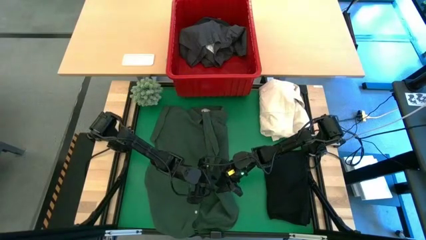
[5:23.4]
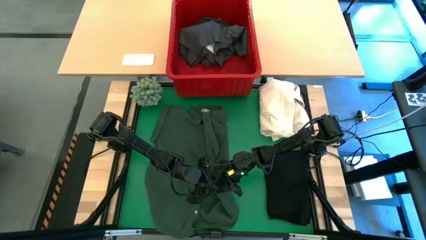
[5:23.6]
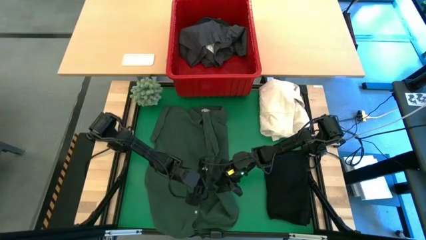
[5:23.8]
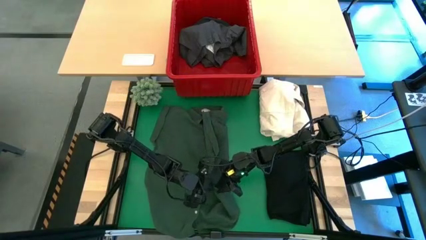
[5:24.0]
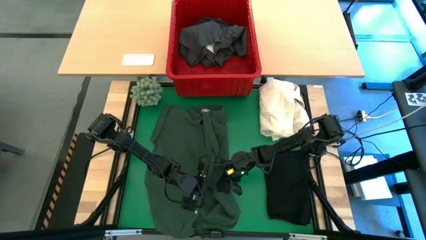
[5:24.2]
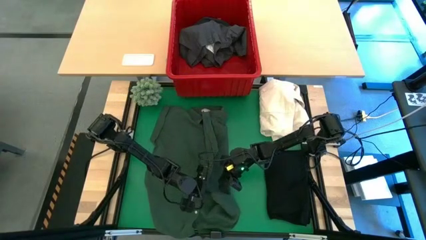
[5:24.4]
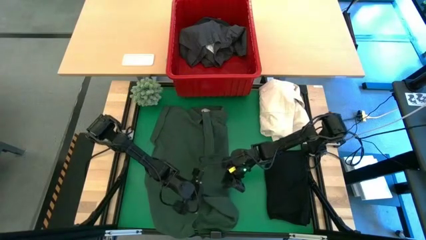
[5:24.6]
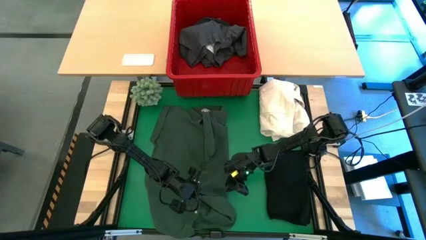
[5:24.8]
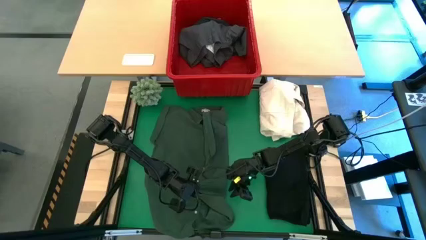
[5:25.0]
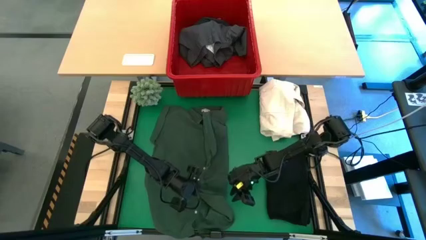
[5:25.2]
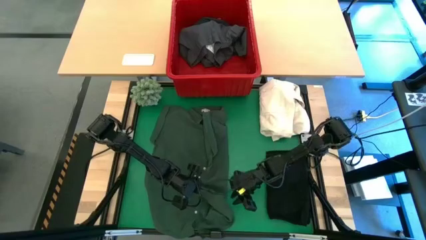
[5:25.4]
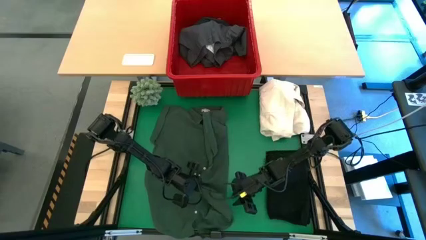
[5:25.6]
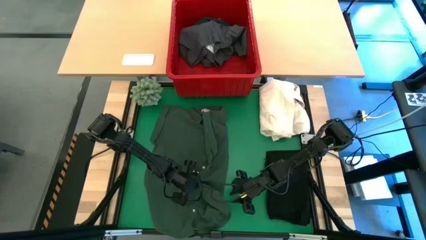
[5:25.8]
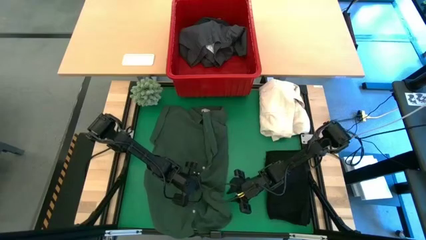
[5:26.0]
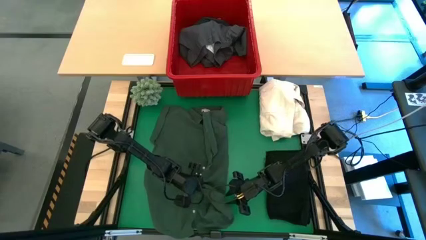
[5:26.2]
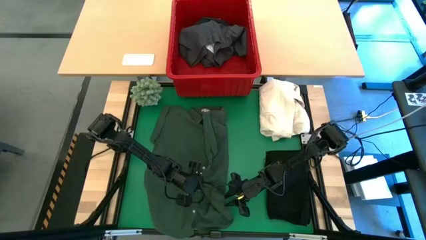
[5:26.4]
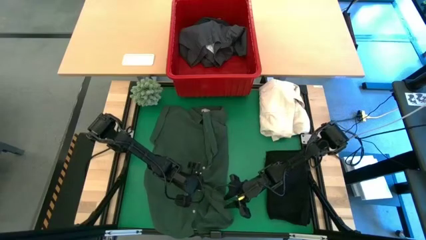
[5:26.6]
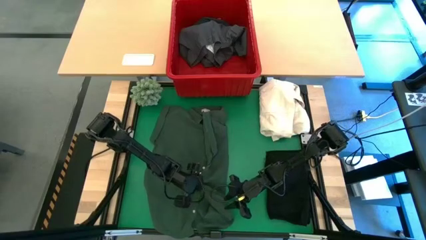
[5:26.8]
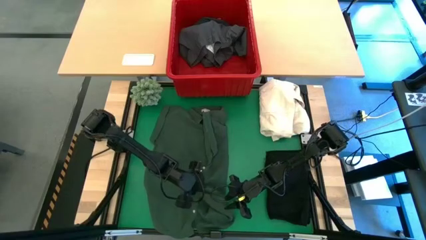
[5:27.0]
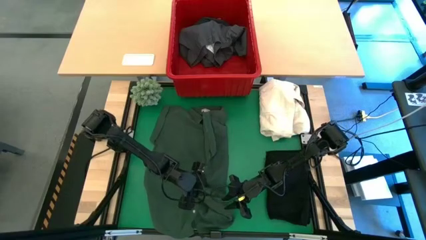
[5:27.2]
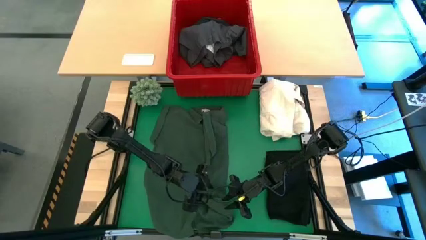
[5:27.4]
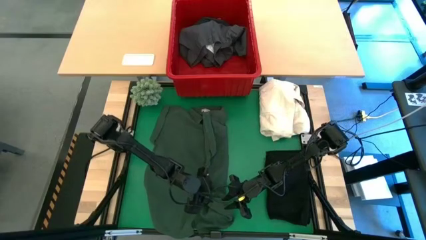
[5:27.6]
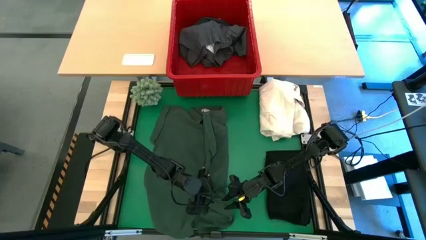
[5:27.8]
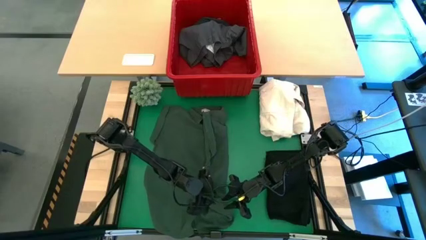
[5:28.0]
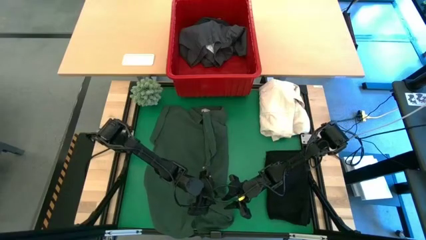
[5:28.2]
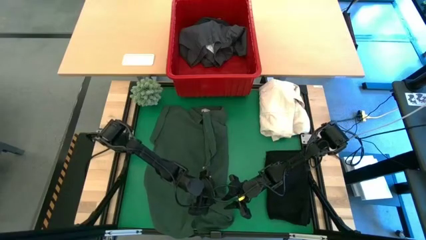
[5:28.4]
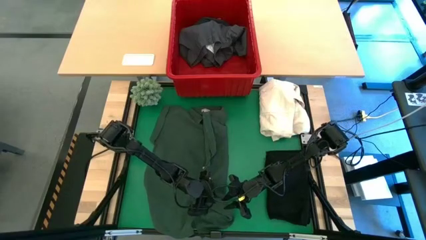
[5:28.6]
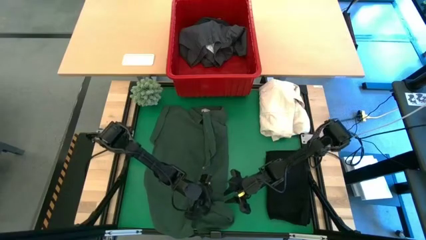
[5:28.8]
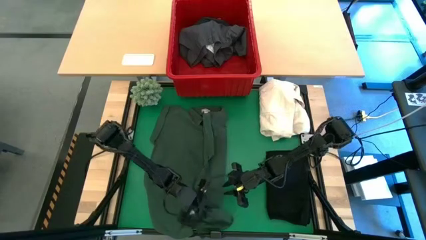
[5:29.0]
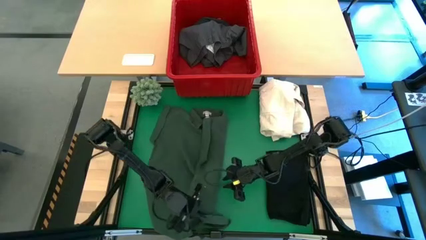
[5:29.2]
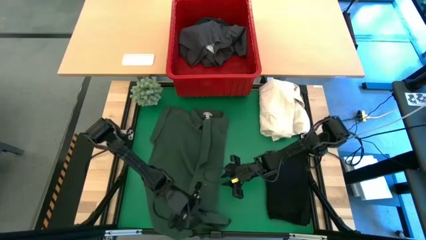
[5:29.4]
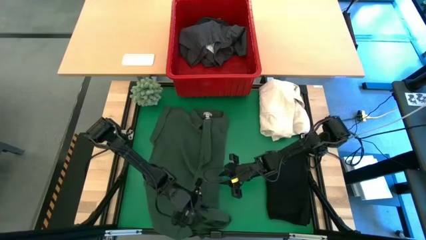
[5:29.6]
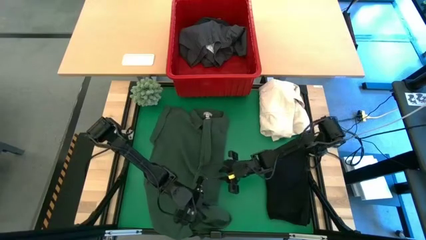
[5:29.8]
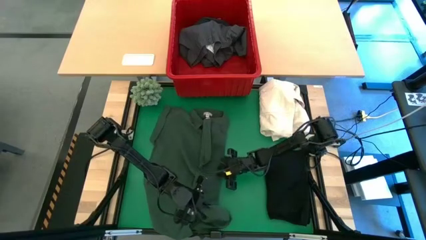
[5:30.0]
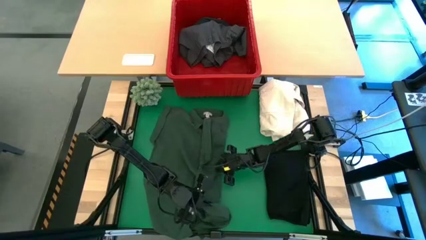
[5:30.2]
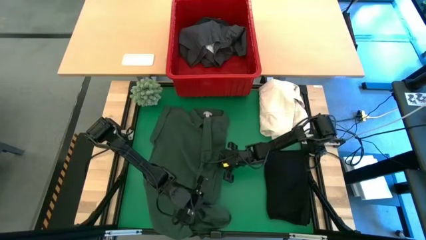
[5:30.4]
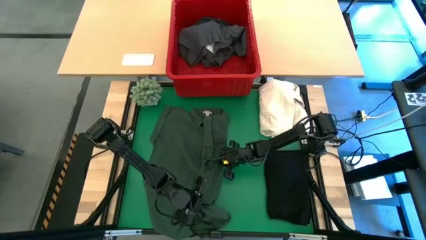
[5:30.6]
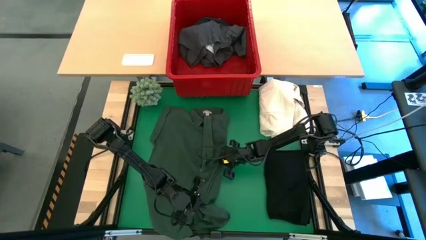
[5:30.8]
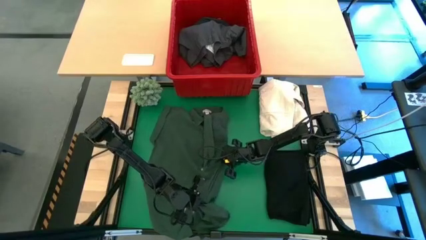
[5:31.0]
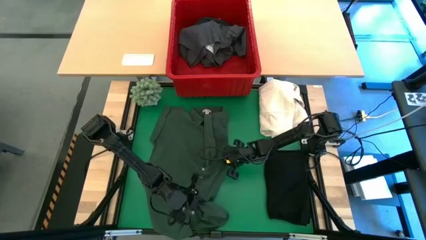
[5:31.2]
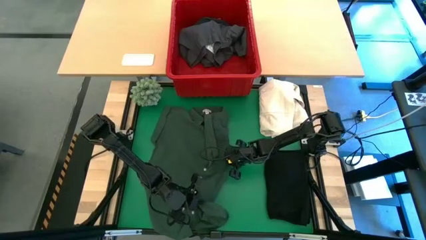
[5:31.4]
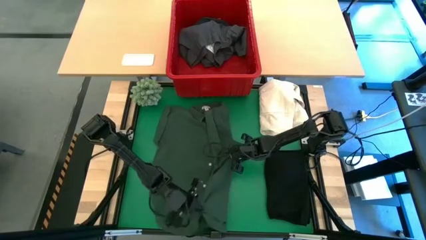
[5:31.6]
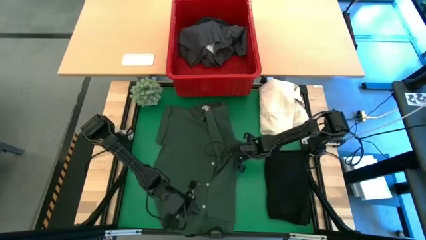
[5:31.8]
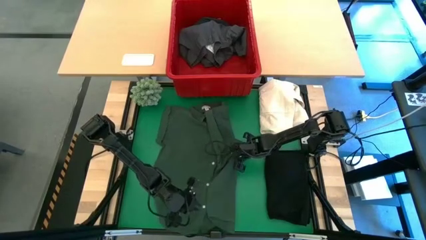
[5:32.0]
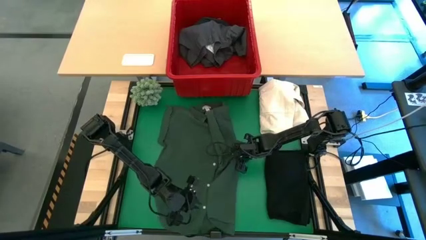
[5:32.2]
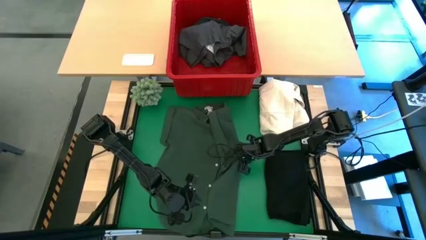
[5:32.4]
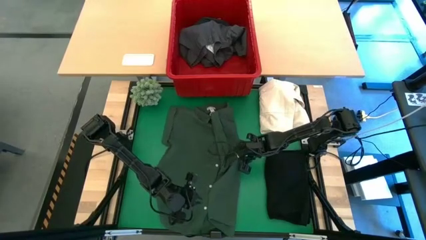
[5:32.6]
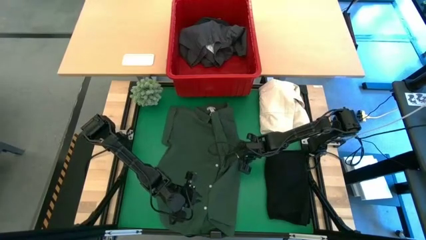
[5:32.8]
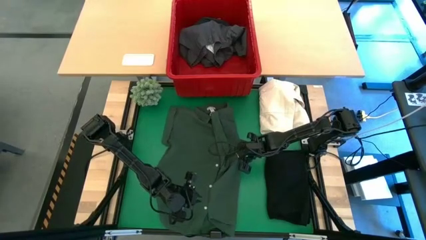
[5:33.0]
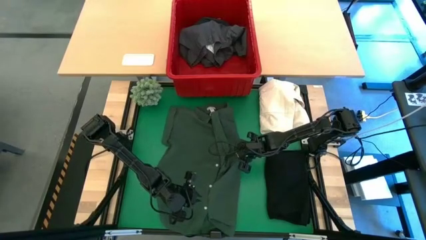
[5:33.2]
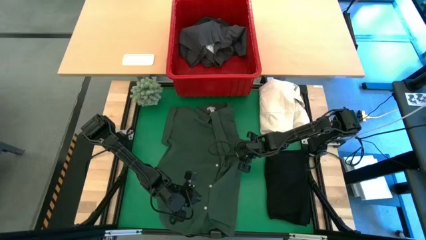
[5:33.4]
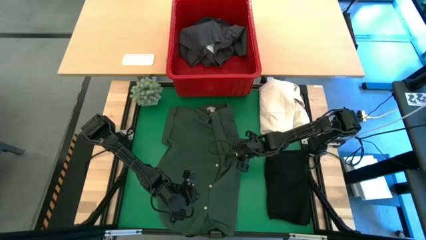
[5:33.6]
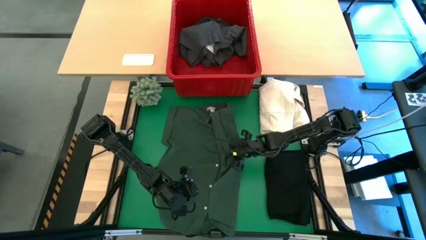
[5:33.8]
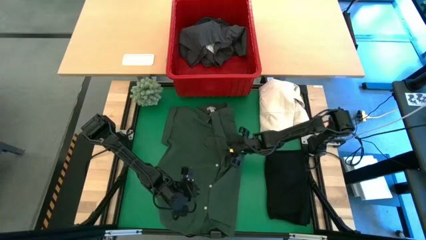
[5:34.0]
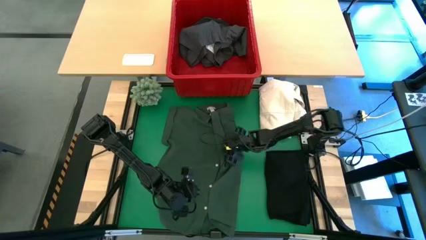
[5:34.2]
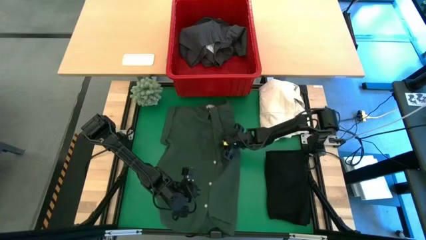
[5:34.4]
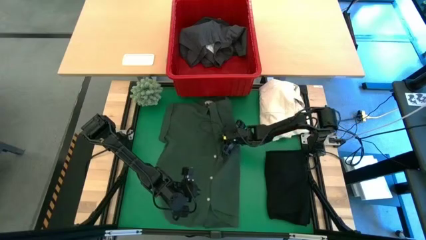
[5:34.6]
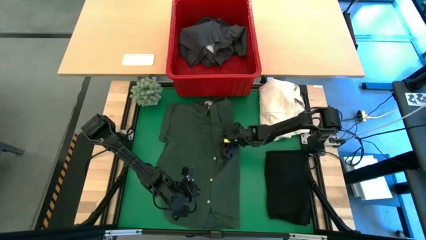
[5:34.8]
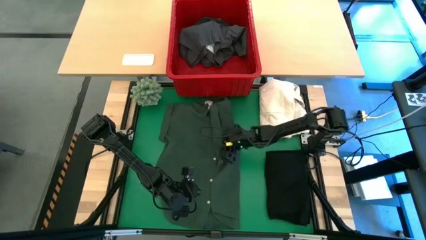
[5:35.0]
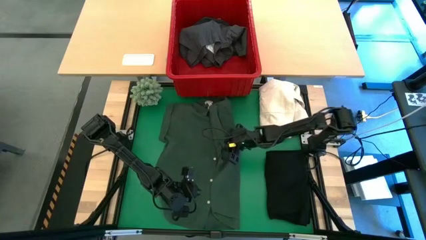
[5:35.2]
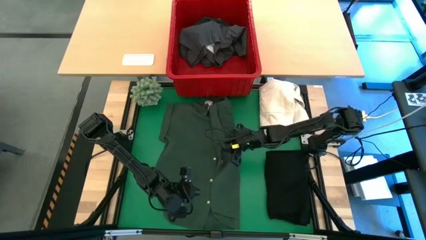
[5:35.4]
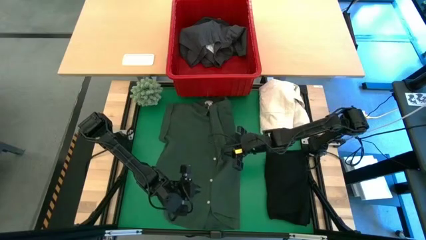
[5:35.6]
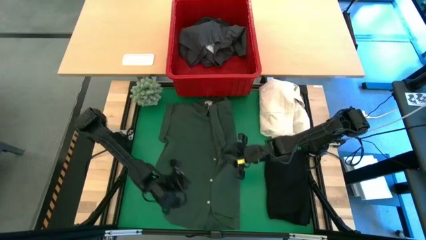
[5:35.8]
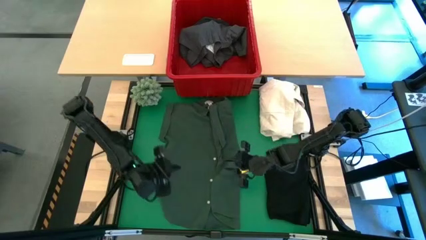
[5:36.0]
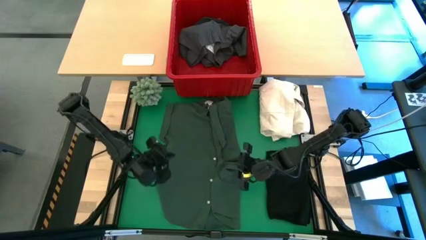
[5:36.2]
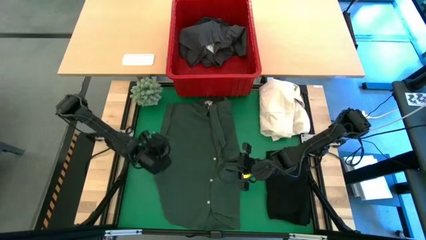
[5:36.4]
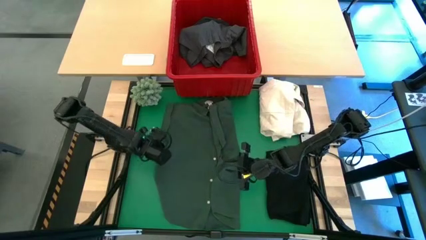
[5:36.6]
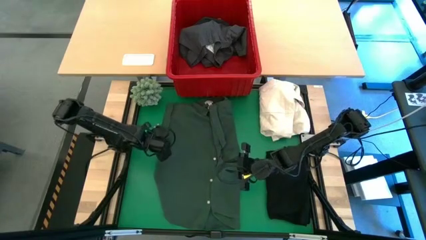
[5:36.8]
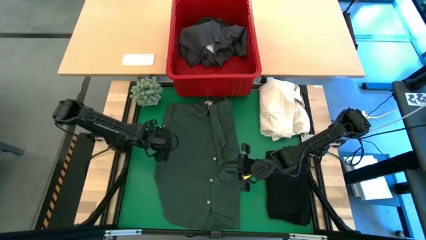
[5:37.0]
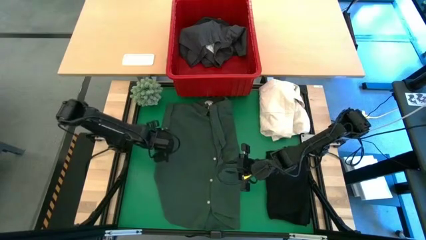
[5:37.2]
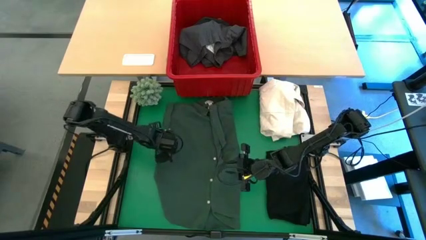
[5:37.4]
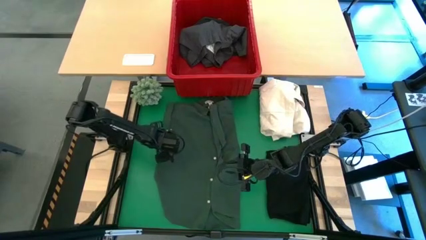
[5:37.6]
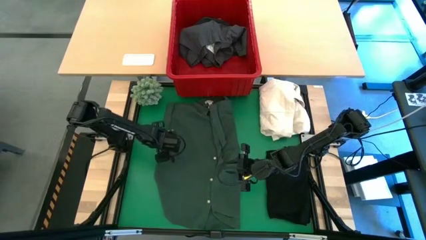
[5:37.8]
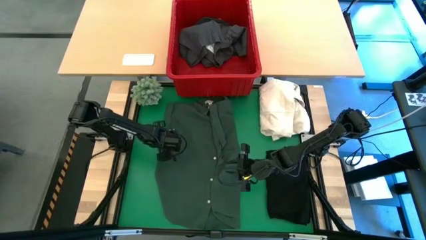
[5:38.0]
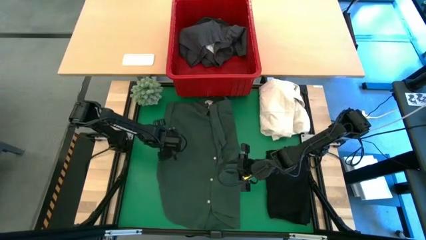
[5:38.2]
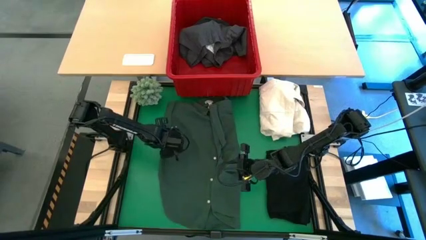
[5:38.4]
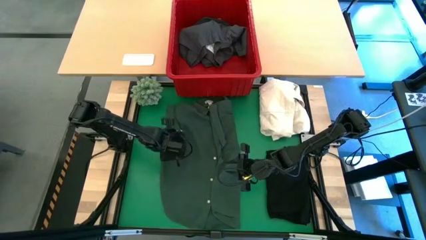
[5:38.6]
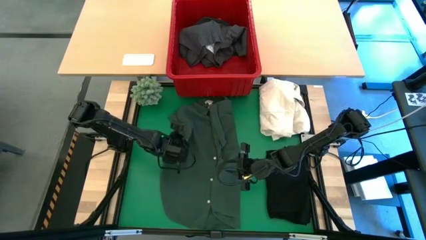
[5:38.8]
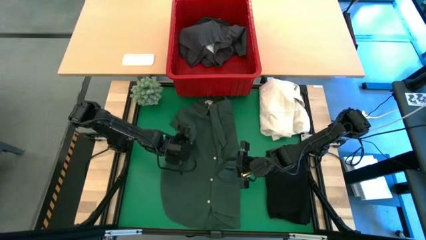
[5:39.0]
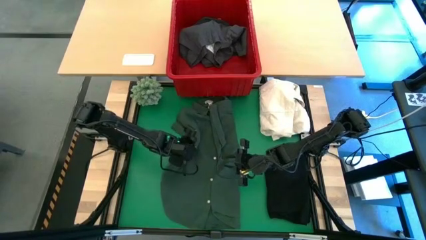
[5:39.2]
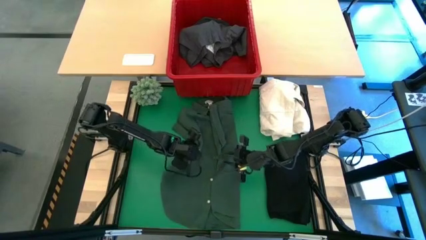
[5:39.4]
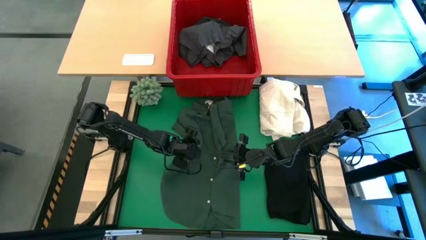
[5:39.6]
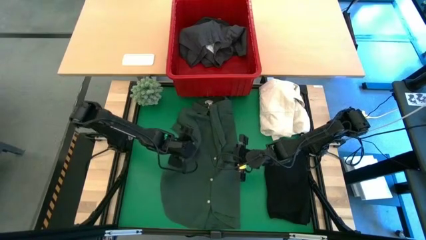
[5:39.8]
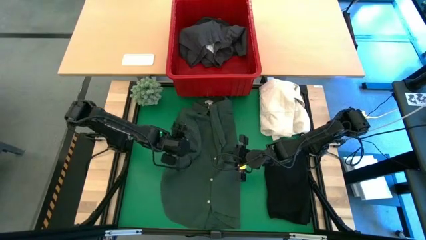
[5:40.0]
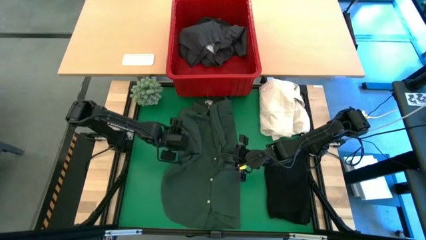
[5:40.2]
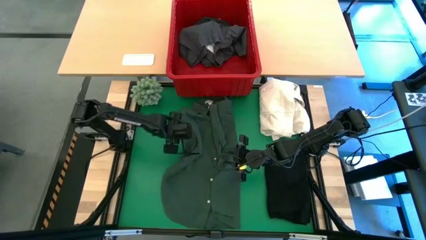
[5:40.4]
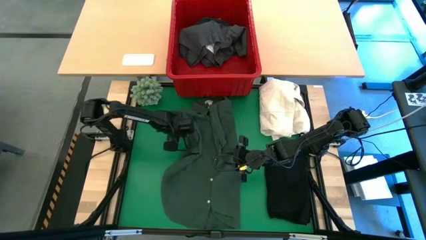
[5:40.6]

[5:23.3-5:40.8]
Task: Fold laundry
Fold the green polo shirt
